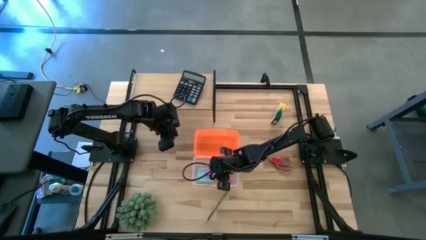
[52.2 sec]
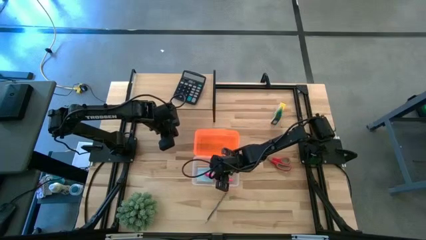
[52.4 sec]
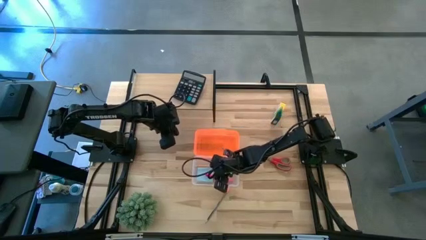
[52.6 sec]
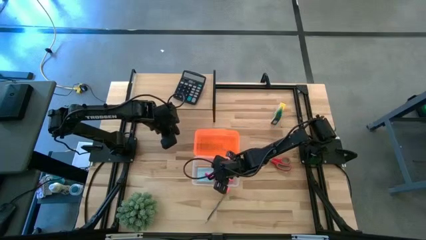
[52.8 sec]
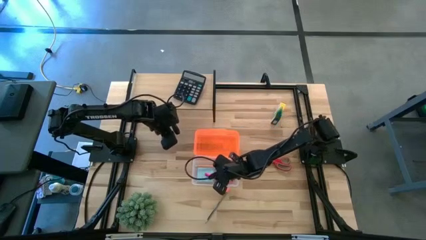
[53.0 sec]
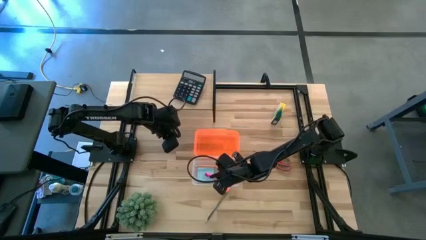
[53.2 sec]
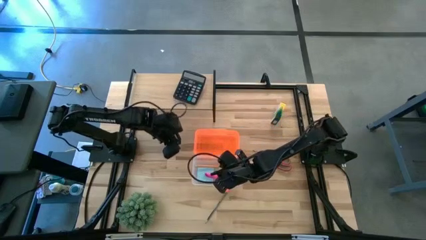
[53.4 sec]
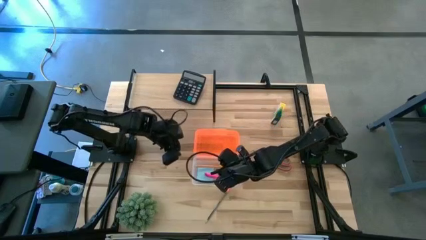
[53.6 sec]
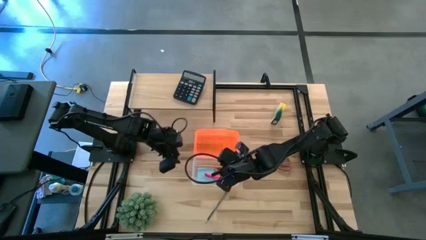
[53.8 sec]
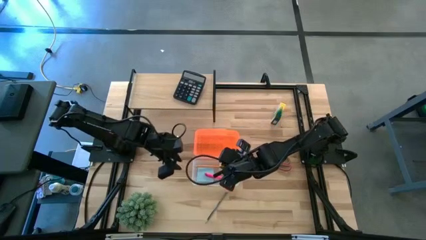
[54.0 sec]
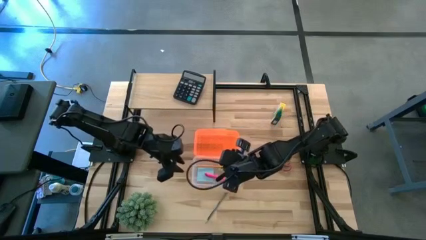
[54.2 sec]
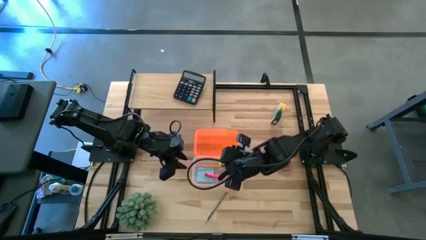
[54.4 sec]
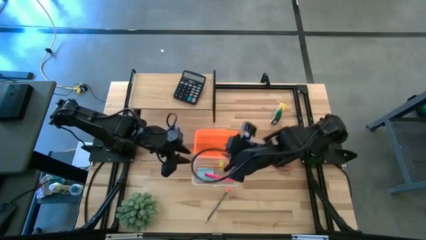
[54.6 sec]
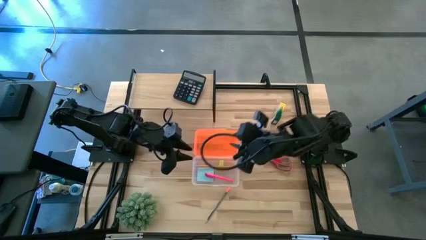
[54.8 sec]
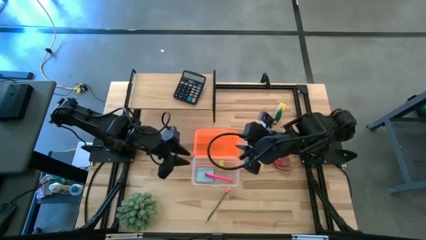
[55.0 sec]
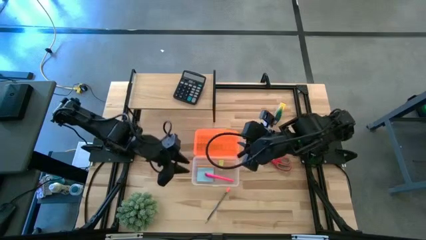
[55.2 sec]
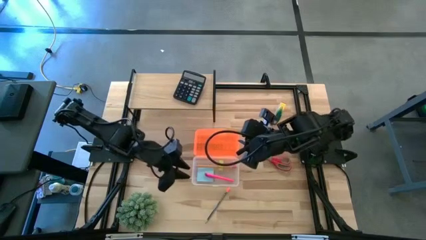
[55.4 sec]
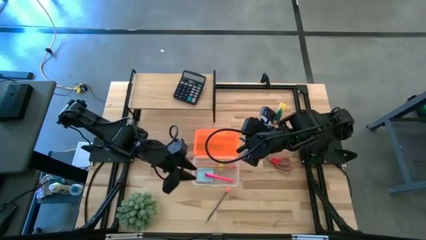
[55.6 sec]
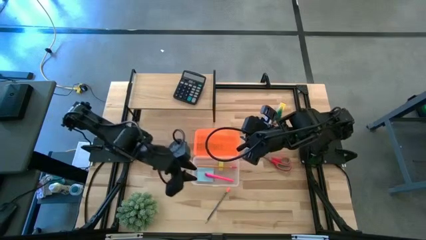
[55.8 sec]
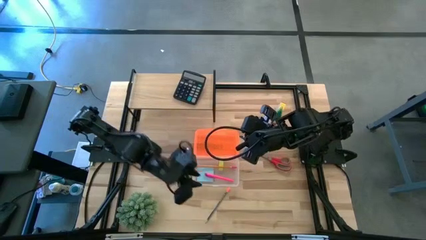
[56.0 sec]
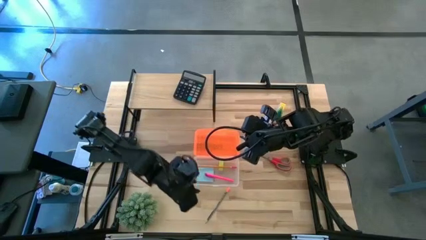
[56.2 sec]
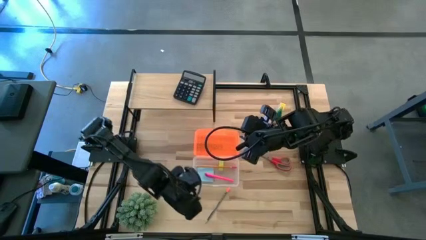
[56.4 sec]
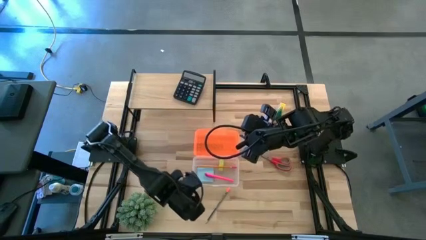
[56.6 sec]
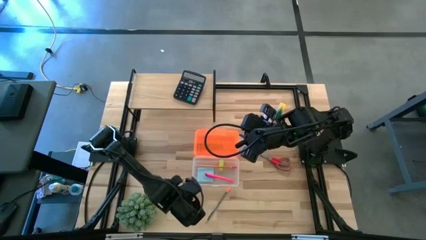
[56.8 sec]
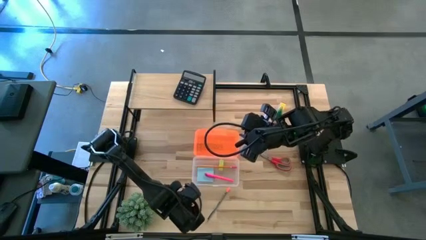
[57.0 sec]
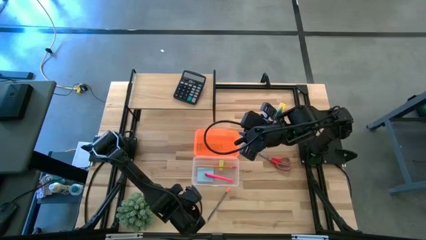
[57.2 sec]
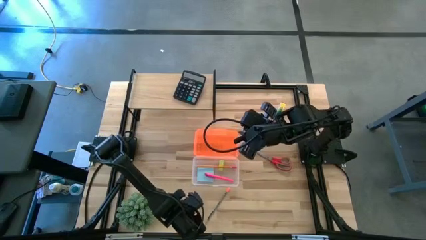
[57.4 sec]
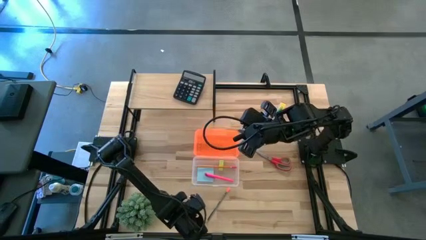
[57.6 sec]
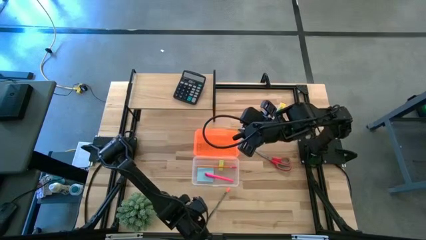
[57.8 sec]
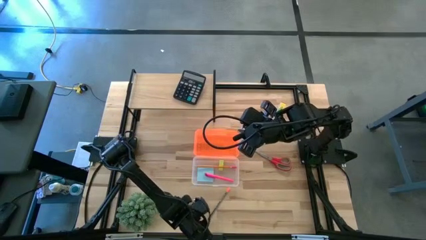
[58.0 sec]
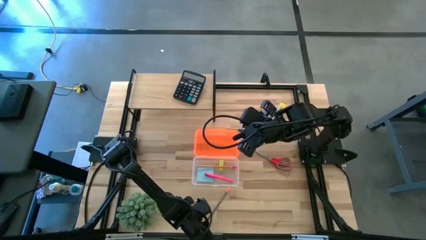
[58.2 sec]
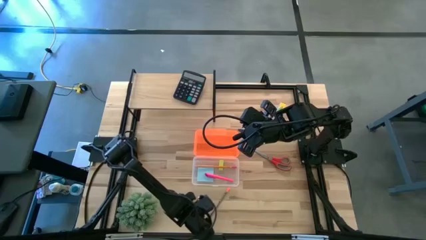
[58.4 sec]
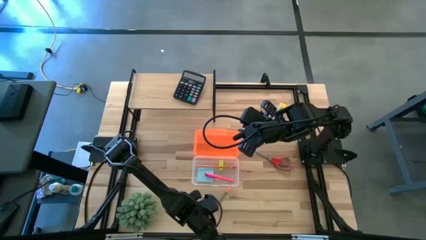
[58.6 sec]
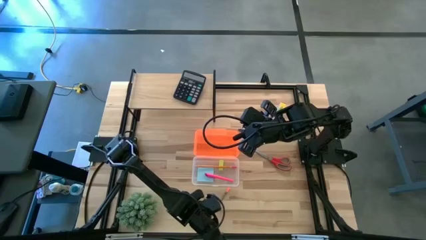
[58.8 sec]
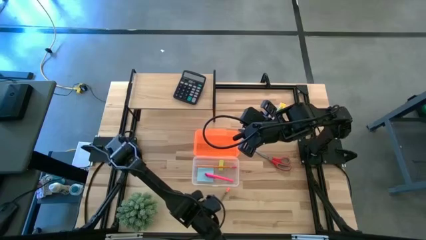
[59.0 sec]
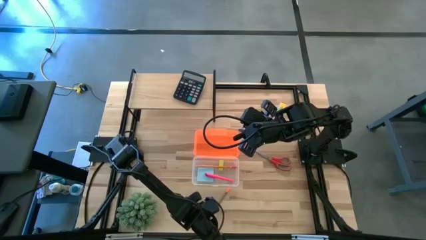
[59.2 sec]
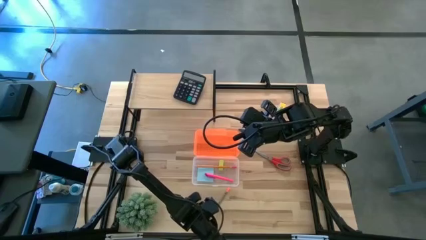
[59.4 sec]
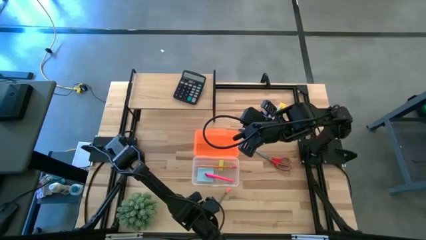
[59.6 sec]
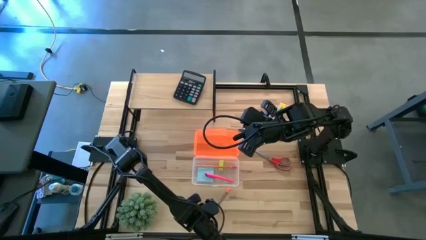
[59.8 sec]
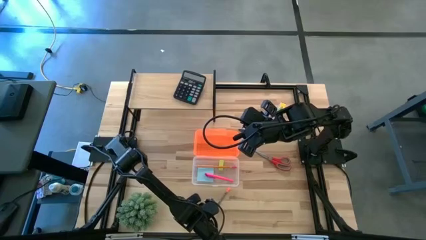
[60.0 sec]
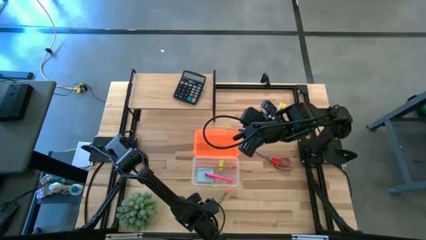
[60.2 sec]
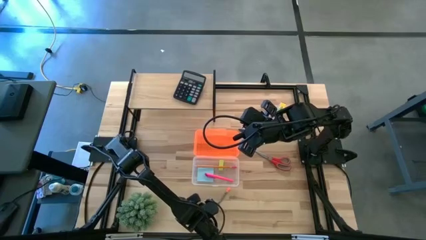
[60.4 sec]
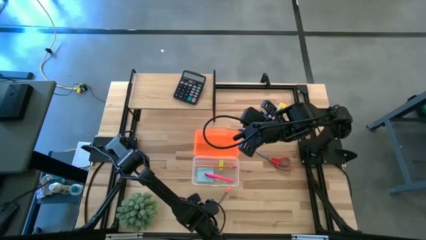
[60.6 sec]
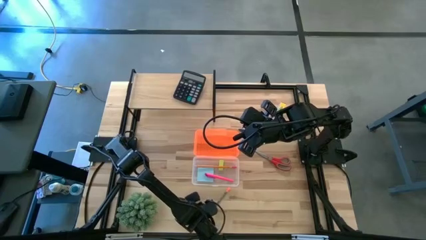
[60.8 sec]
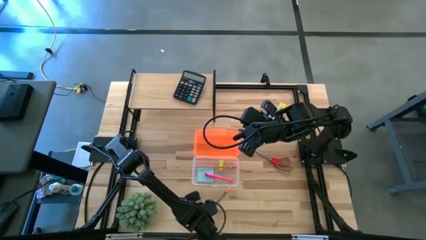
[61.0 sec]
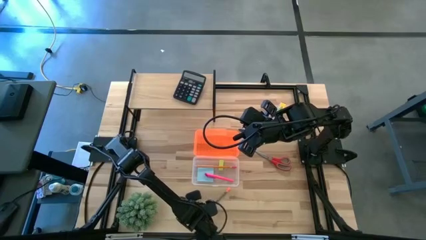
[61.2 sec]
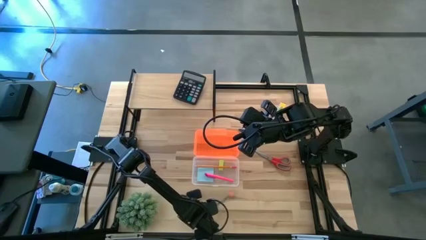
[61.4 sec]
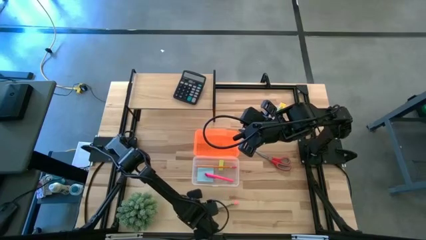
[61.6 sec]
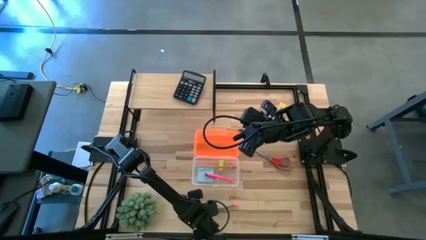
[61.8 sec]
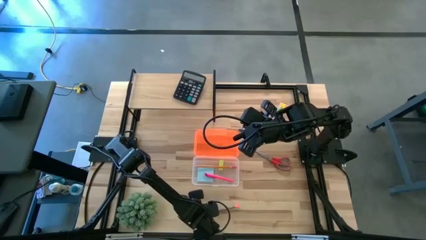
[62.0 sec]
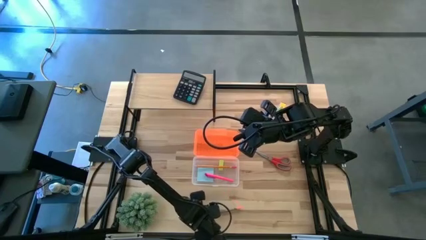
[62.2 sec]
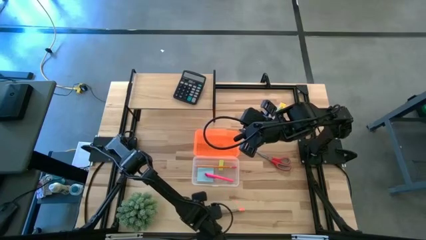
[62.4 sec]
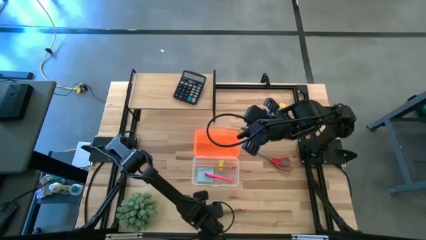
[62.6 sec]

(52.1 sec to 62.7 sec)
Task: Pack school essentials
Put the black pencil into the school supply box

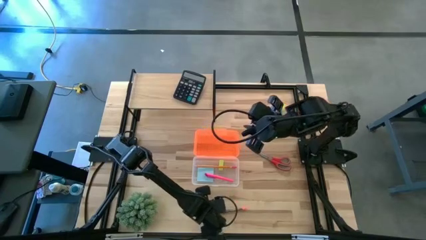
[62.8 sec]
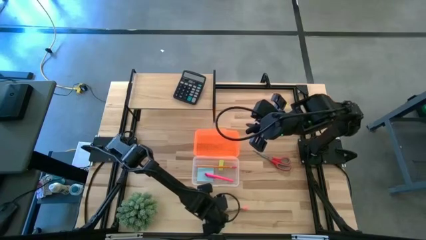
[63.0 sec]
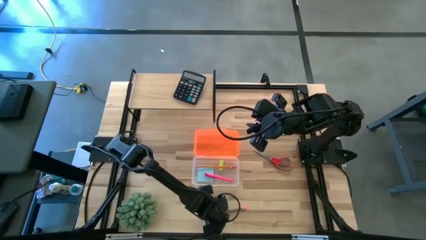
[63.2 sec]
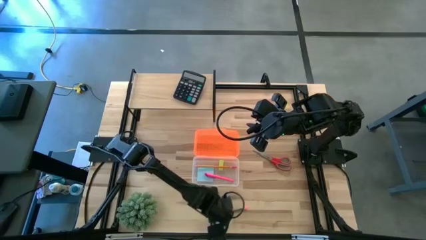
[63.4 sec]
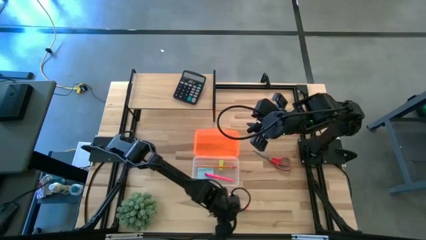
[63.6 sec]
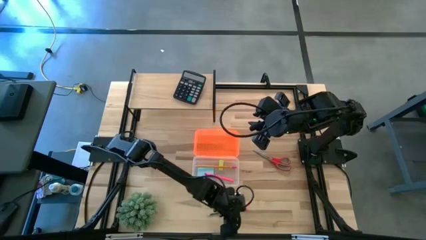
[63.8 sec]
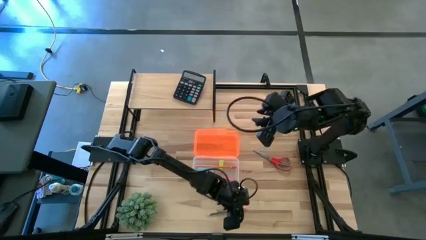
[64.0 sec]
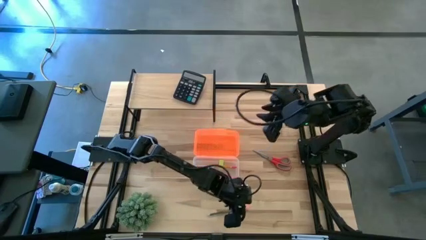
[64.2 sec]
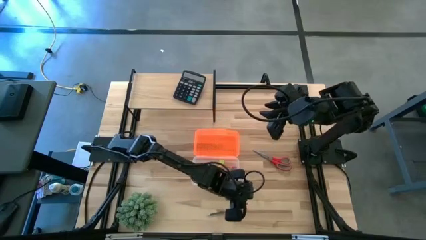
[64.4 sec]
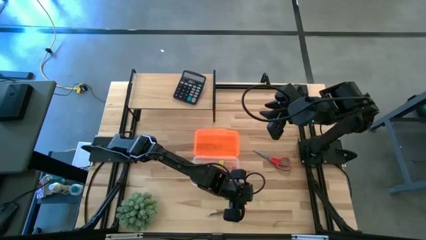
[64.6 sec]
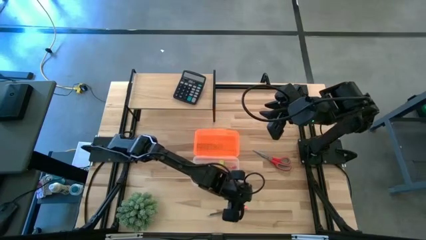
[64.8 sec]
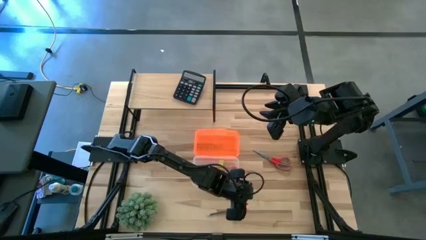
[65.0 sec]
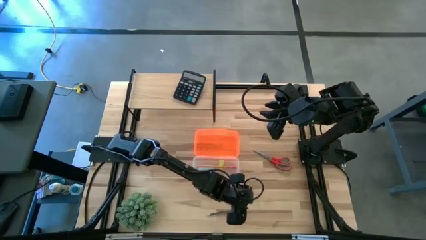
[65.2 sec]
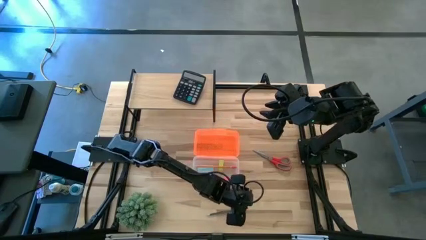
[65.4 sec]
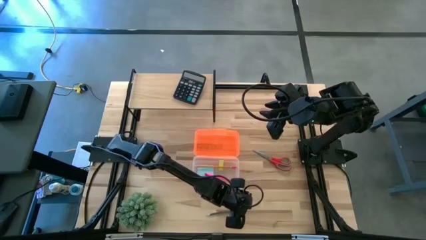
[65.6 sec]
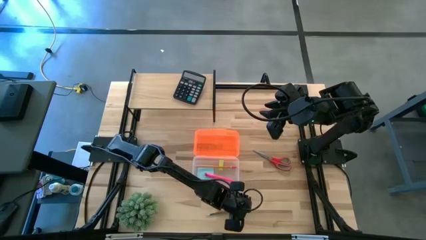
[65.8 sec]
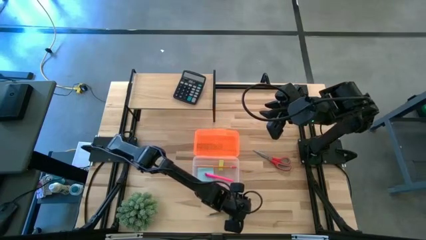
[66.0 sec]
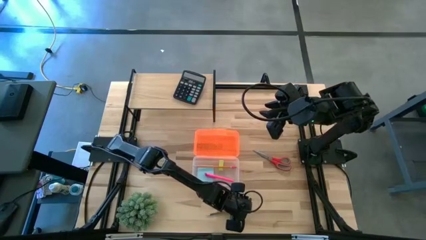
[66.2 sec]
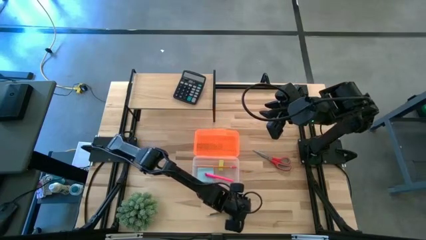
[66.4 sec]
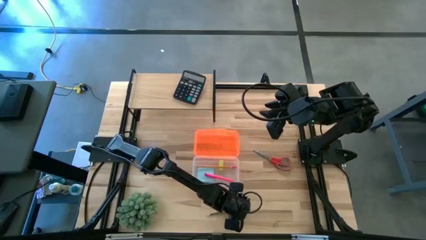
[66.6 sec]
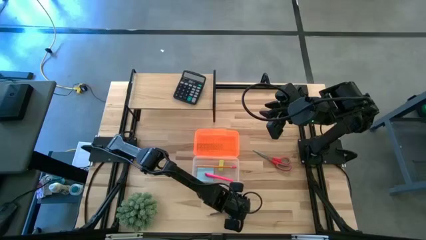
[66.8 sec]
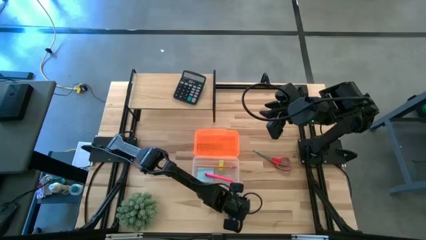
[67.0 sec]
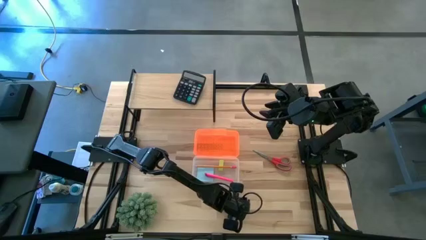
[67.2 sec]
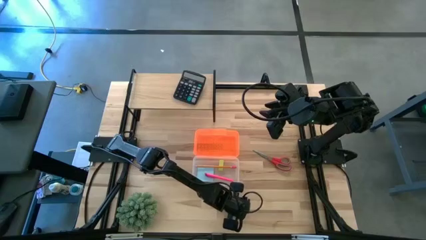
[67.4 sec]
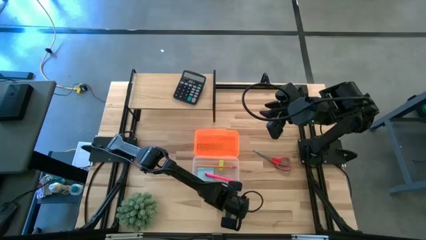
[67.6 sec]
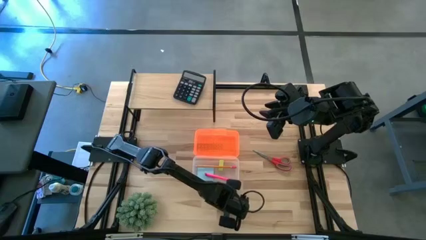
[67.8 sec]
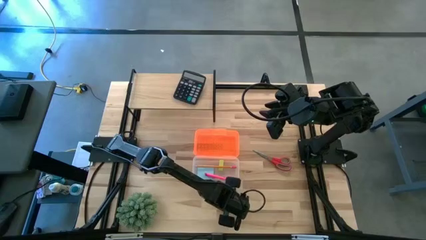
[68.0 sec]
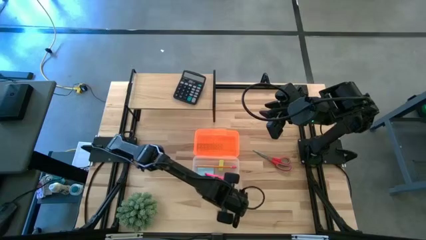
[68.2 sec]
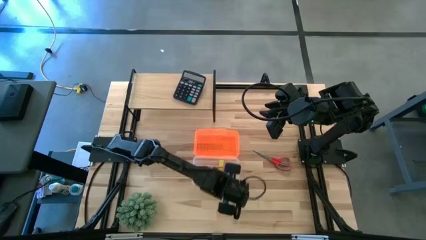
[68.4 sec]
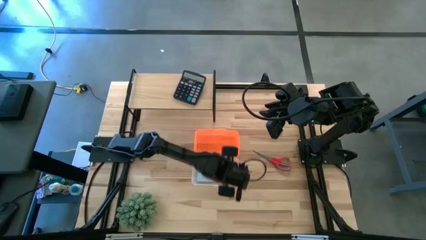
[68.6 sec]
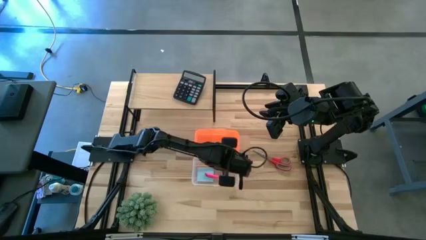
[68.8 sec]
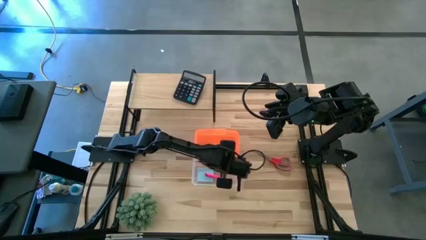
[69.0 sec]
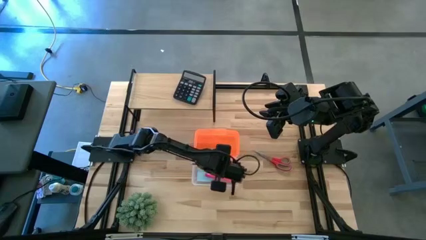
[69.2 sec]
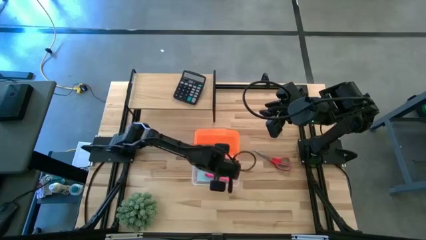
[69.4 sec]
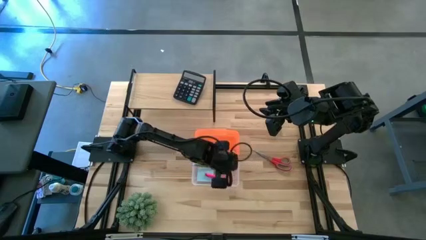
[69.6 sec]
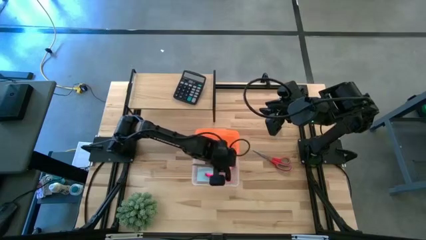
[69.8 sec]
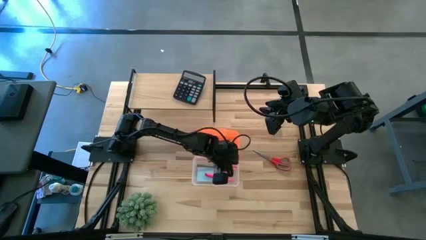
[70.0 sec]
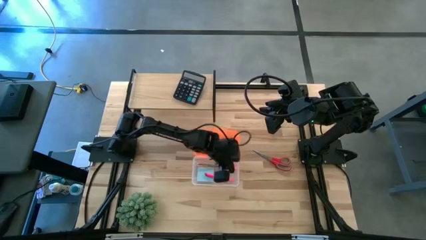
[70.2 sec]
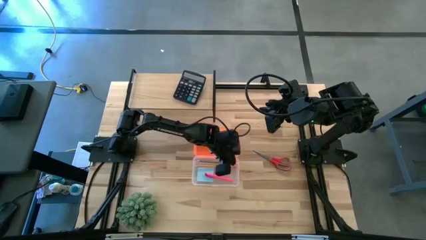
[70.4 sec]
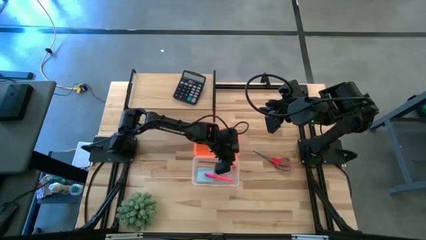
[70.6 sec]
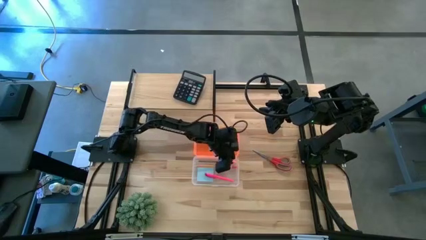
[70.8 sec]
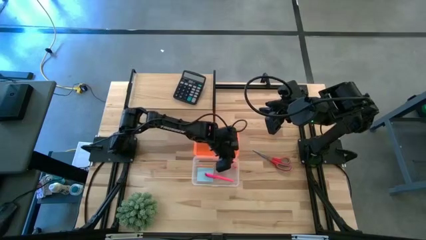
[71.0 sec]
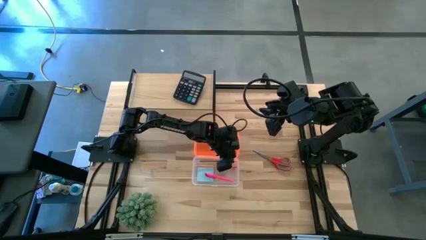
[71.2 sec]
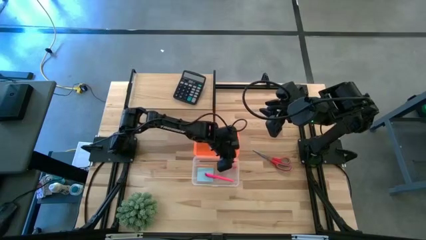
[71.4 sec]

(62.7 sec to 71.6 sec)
Put the black pencil into the school supply box
